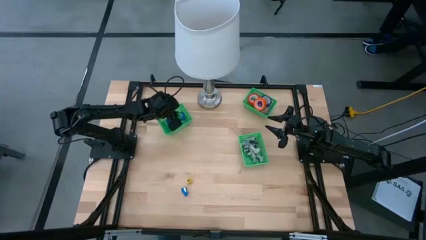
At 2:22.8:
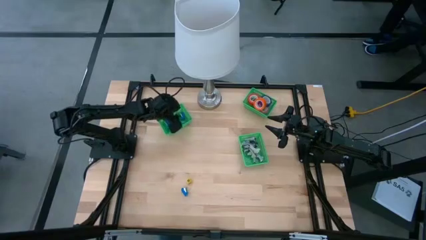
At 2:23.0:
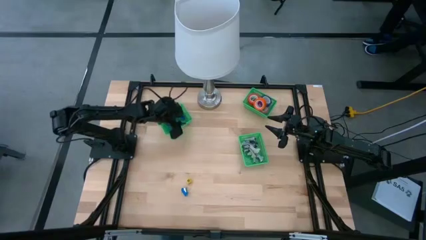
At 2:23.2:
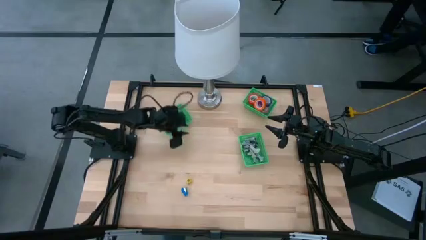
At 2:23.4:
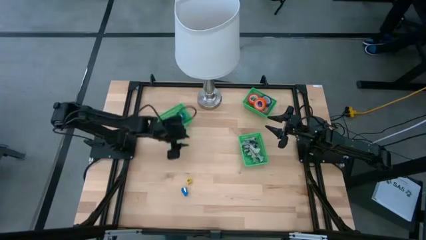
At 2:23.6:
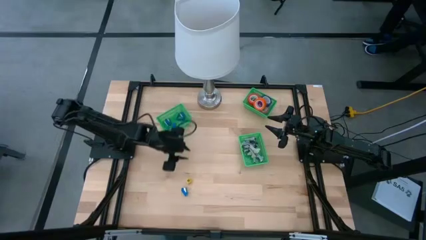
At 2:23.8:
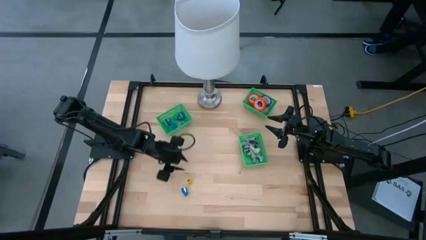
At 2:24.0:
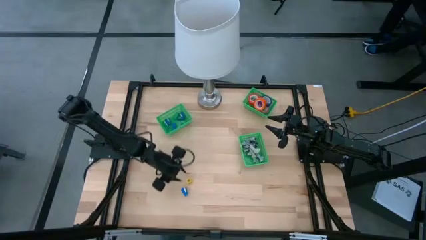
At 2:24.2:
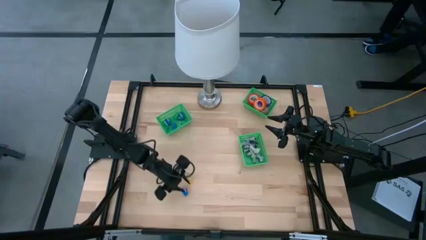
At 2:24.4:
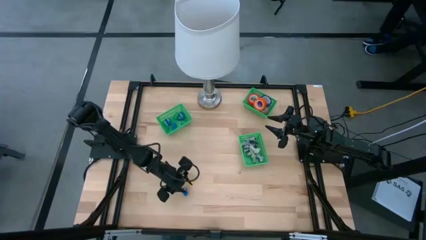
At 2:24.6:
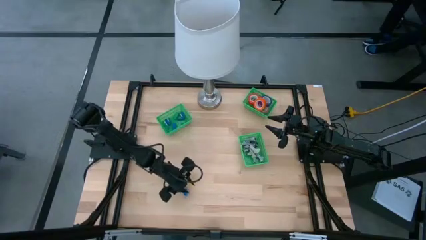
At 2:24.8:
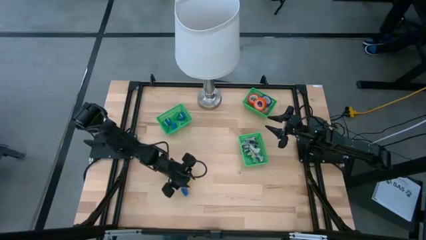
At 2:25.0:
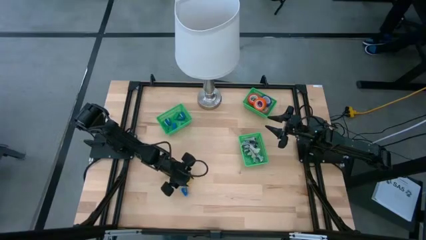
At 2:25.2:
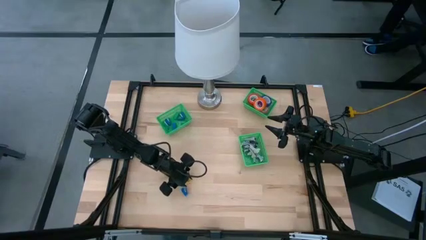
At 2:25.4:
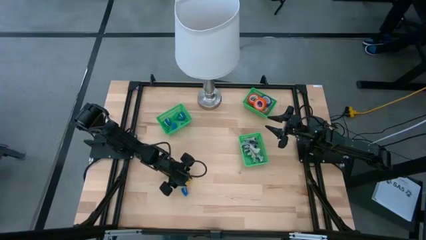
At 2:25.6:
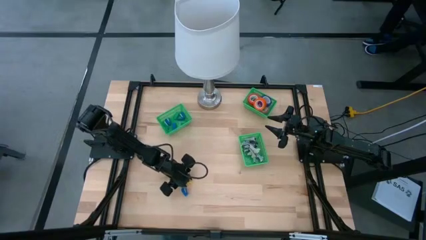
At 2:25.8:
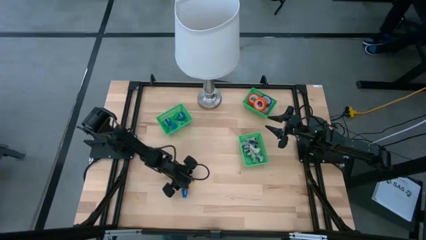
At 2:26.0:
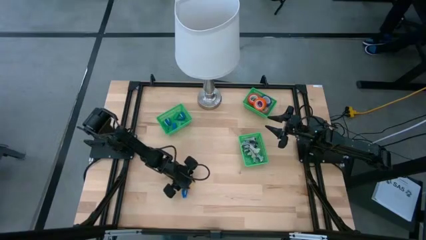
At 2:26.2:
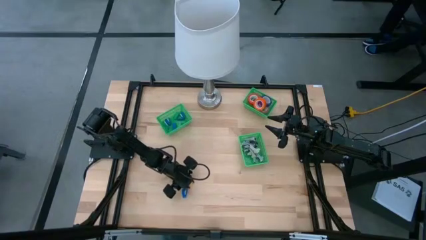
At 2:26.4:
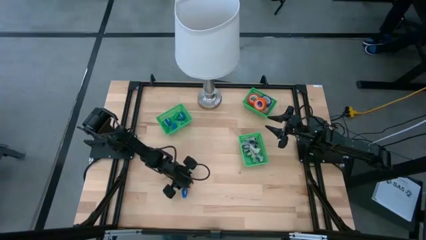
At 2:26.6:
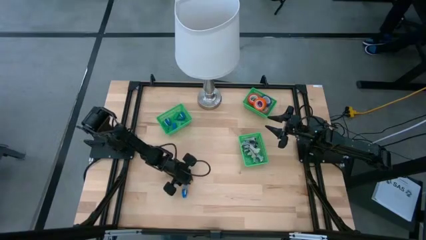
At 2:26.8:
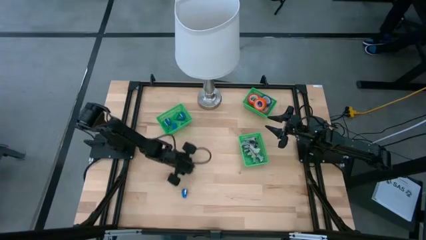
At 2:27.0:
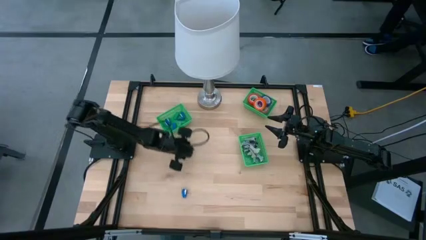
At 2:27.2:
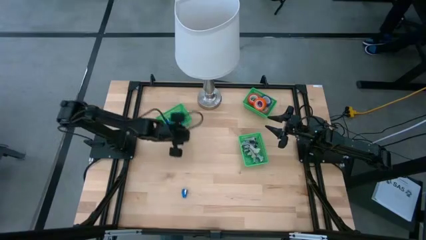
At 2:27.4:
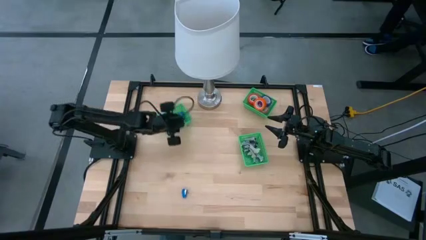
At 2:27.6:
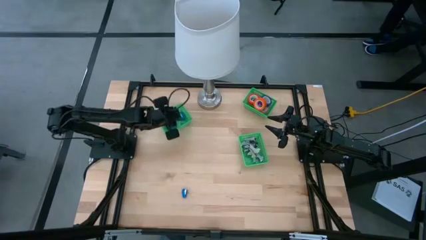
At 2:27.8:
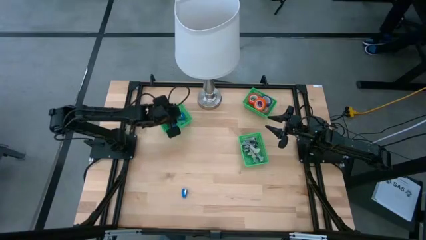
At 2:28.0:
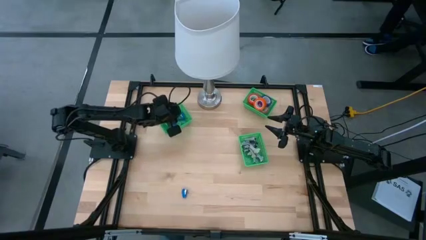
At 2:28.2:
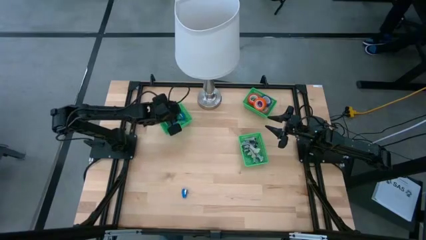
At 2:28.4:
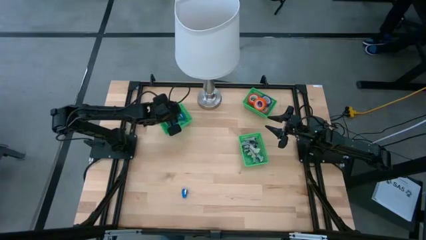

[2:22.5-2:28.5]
Task: Pick and place Stapler, Stapler remover, tape
Put the yellow stapler into the left green bin

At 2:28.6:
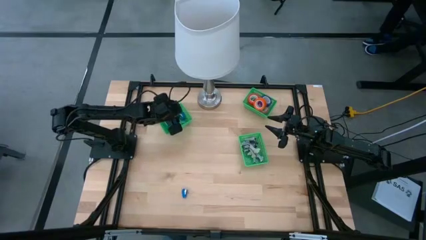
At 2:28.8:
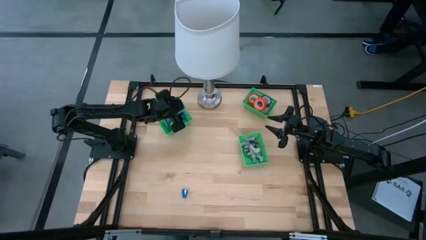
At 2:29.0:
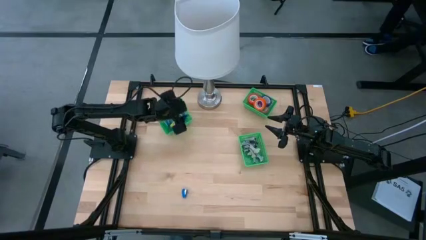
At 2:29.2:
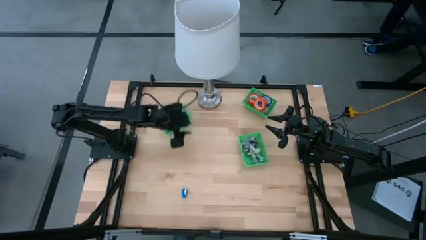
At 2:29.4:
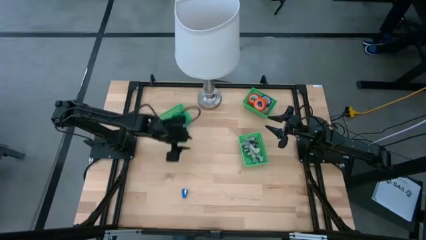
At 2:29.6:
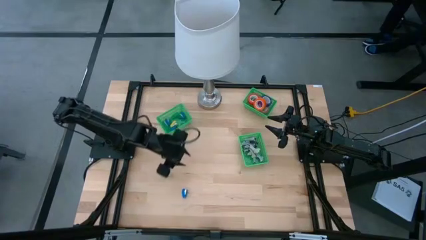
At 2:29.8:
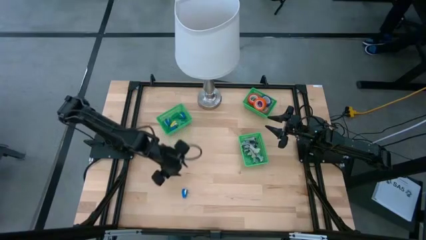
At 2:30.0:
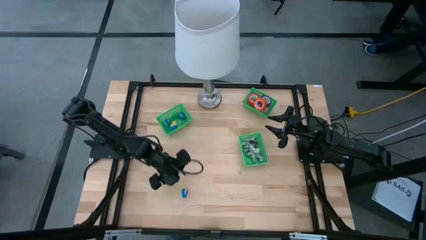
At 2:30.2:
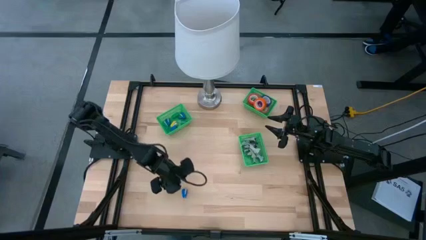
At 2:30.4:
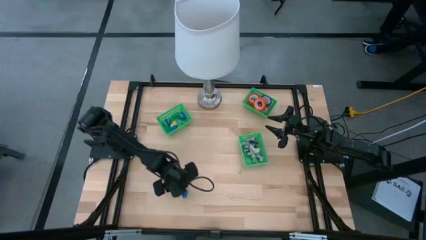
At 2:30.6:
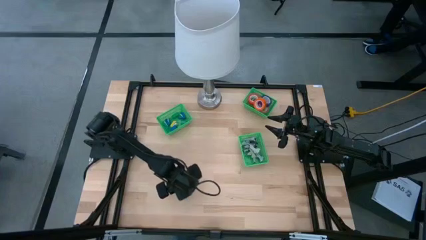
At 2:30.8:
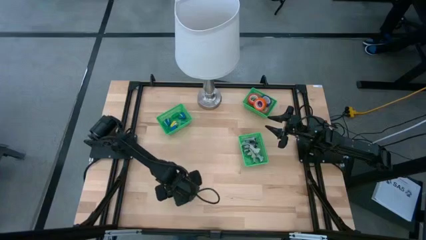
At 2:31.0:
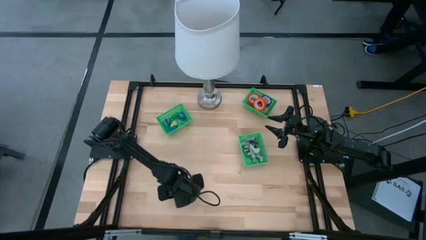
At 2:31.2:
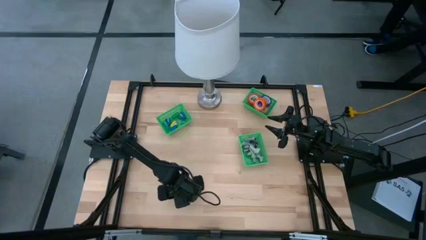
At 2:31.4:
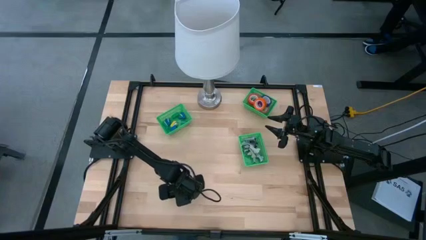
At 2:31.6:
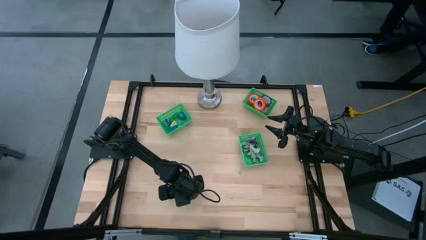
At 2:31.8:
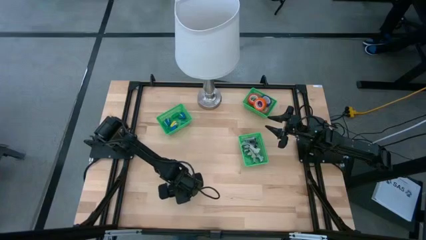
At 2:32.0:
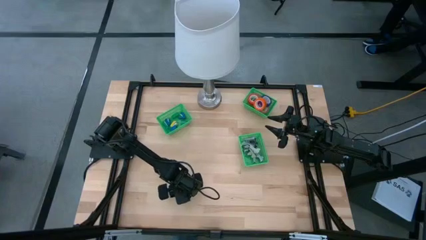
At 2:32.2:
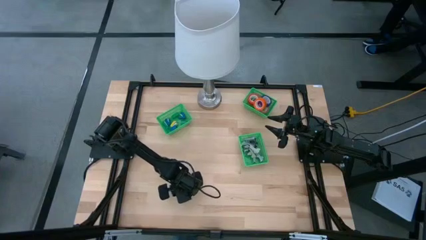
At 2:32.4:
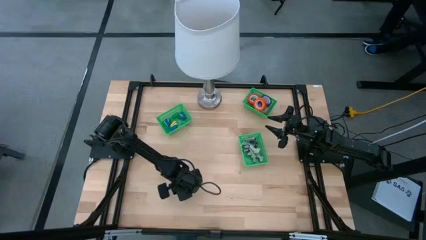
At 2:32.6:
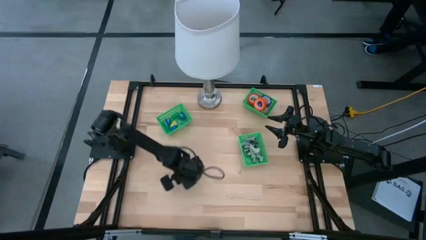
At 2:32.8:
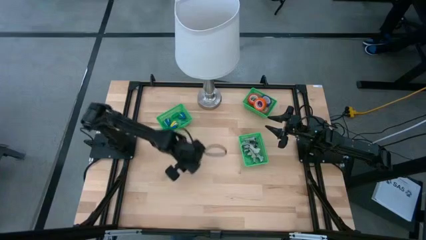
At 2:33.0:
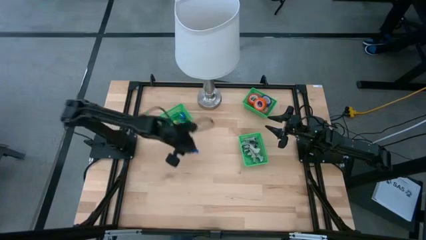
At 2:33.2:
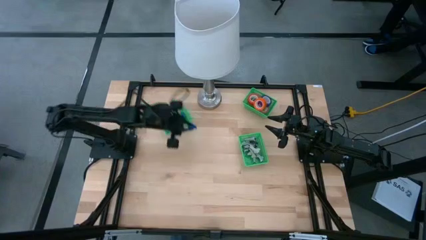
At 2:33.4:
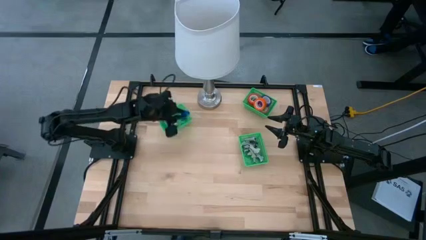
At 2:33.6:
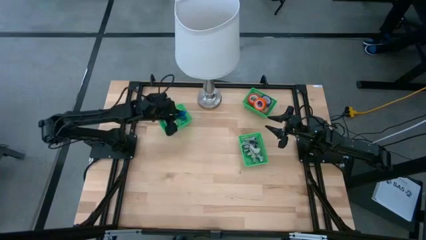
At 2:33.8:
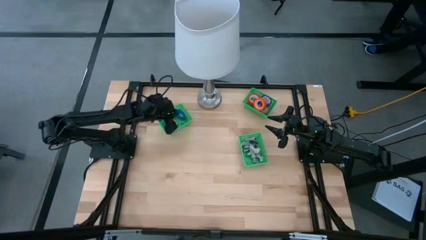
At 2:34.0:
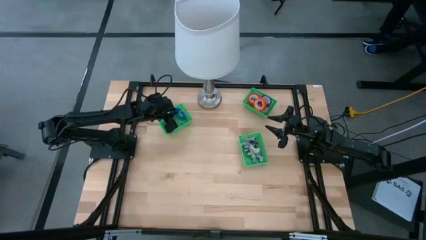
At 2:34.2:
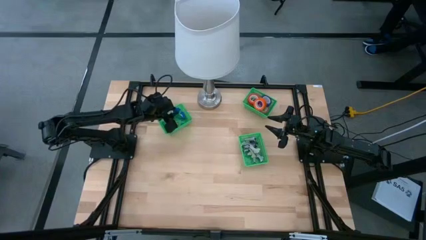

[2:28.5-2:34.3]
Put the blue stapler into the left green bin

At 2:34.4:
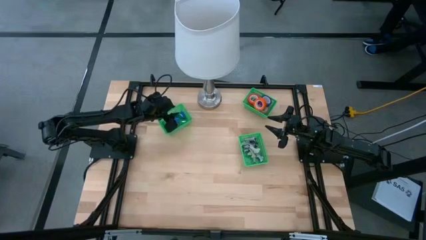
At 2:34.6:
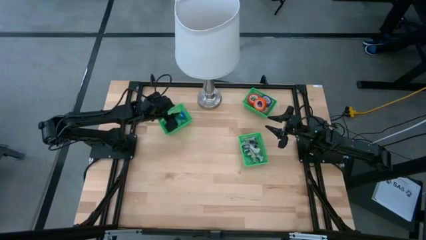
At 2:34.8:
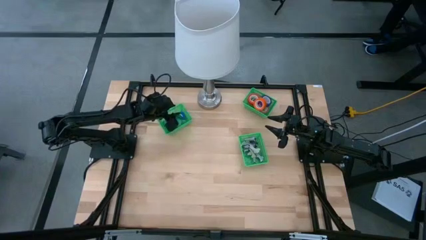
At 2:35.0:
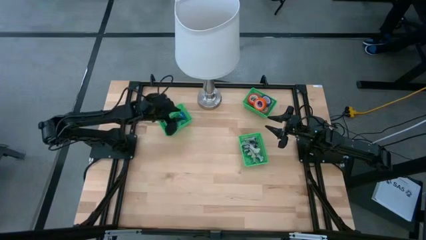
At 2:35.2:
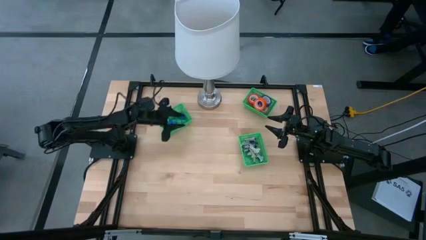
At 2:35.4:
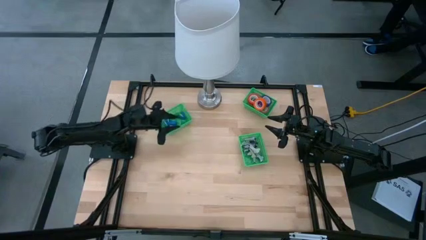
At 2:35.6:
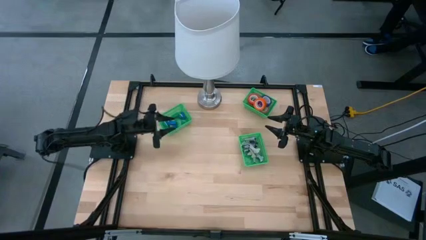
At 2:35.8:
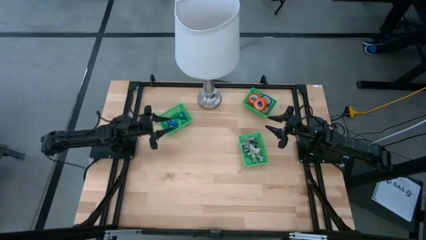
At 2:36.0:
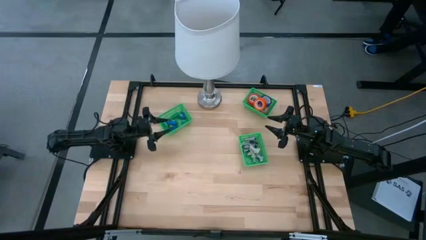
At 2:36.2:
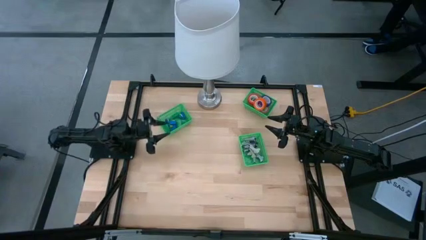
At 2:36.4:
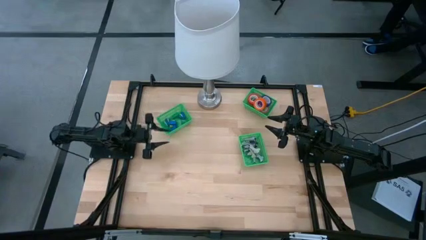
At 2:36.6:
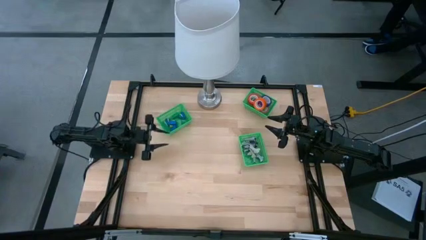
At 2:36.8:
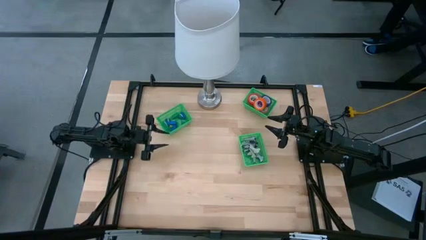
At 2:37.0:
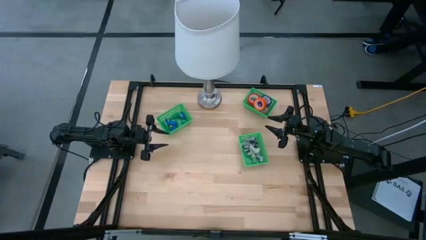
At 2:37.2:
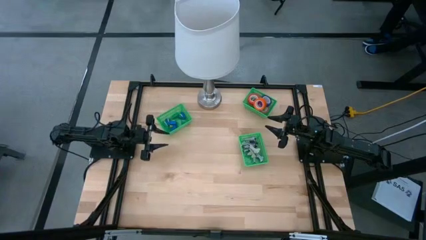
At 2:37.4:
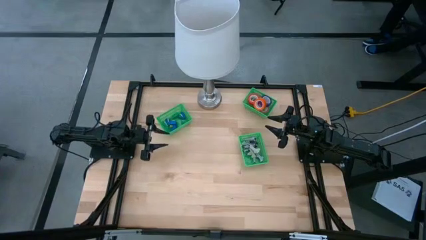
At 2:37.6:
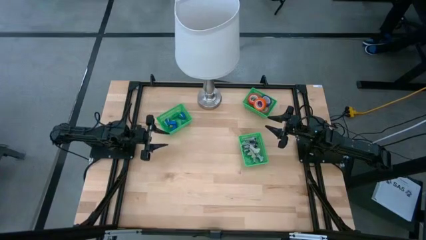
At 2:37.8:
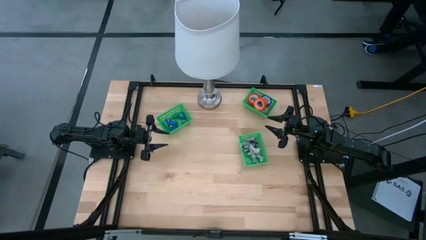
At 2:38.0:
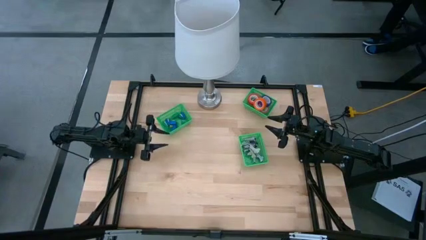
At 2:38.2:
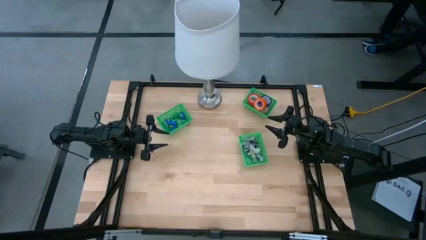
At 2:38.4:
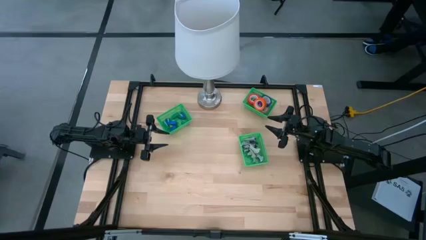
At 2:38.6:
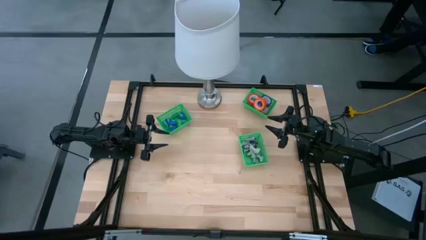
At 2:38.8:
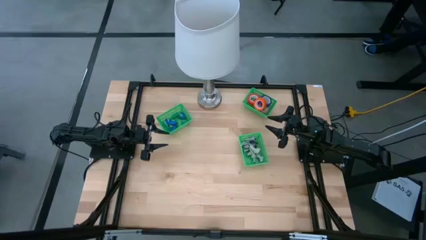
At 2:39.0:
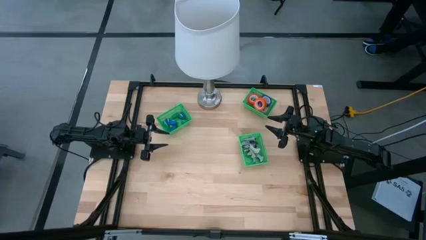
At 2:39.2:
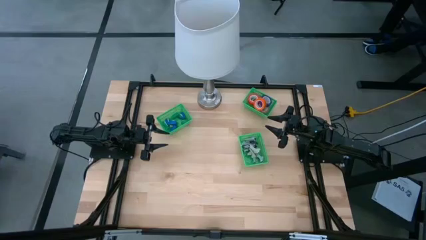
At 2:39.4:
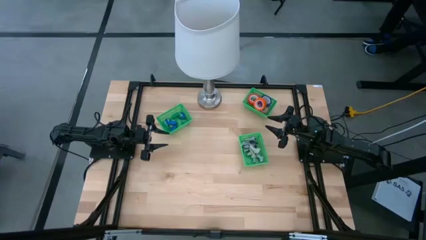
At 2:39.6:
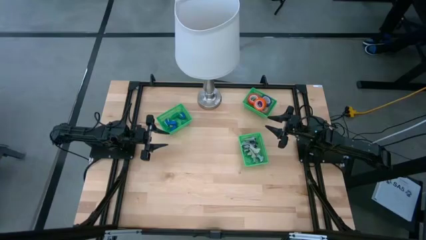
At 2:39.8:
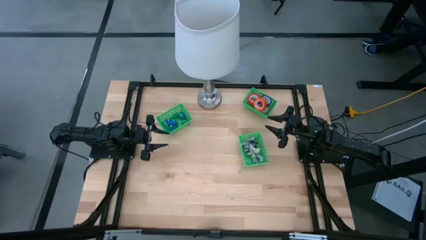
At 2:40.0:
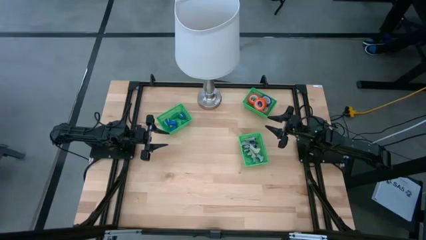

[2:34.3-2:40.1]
Return to Home Position
